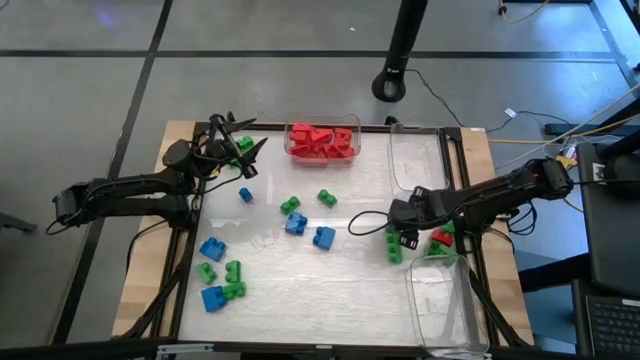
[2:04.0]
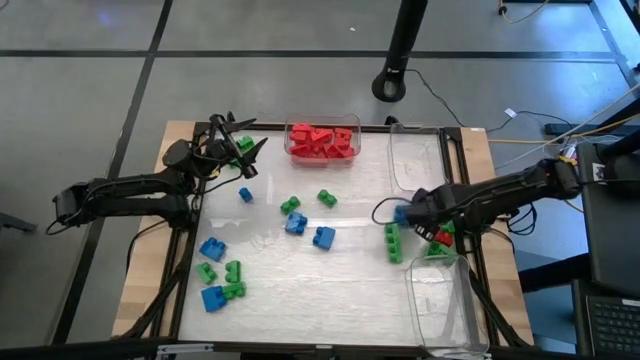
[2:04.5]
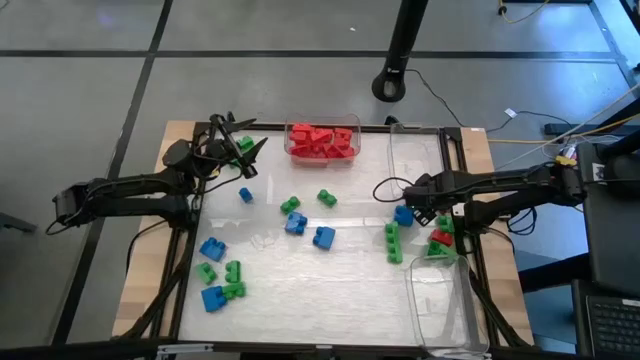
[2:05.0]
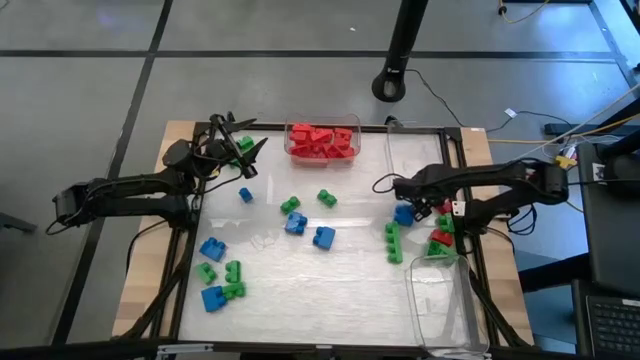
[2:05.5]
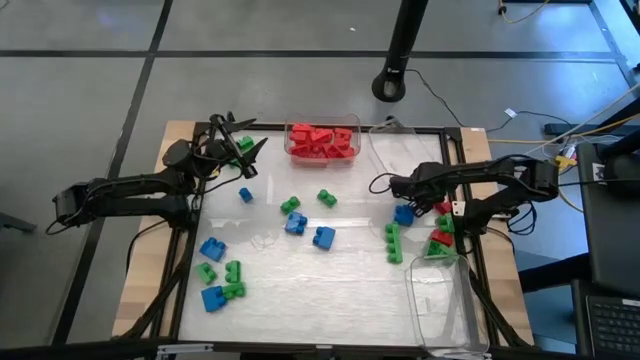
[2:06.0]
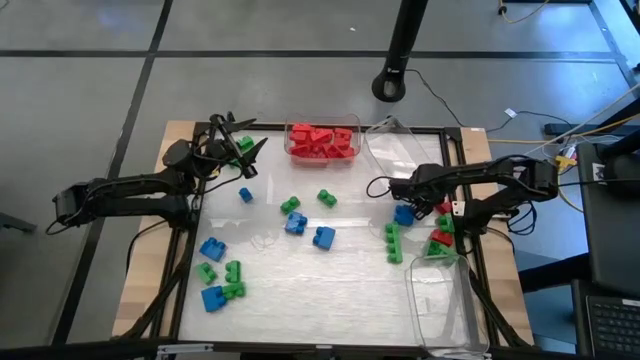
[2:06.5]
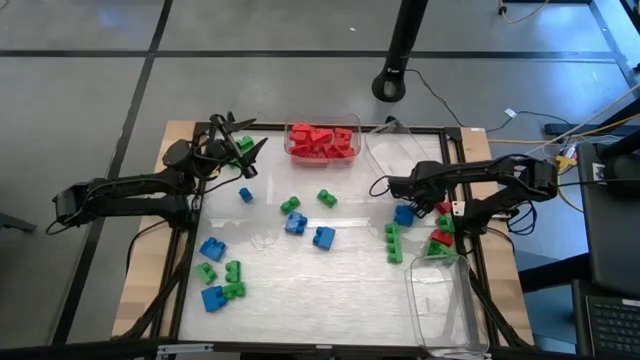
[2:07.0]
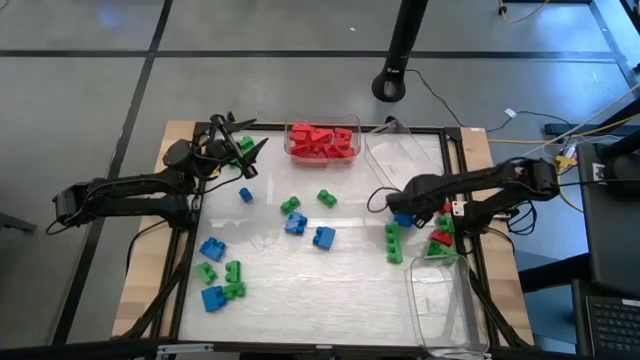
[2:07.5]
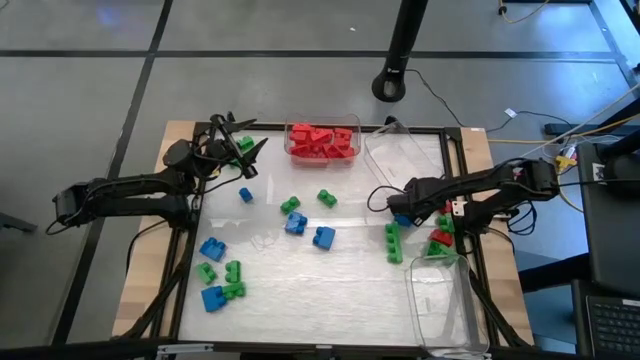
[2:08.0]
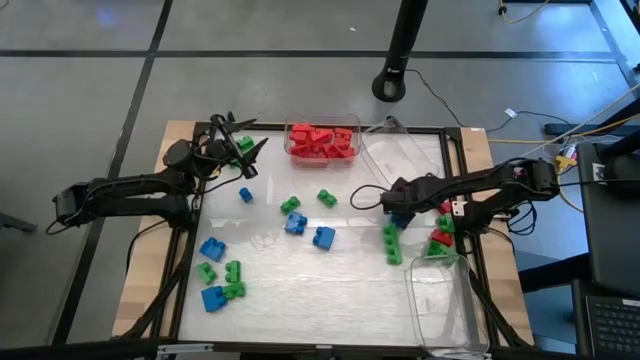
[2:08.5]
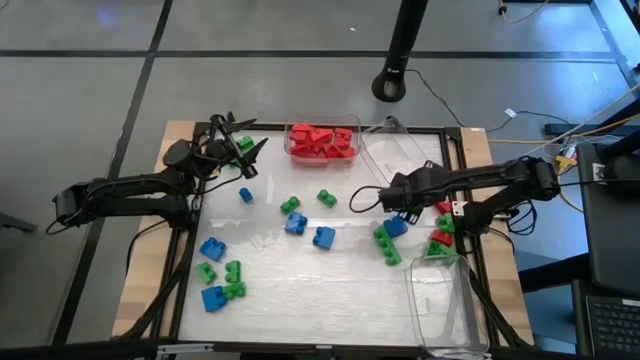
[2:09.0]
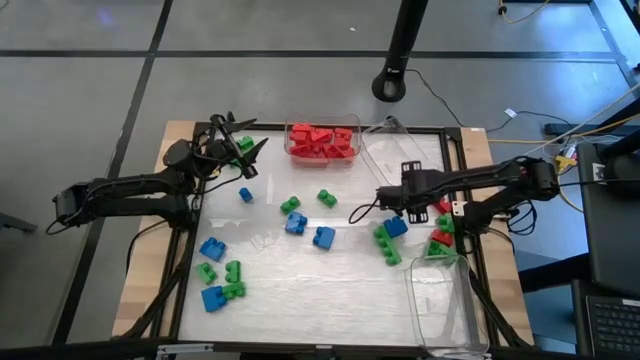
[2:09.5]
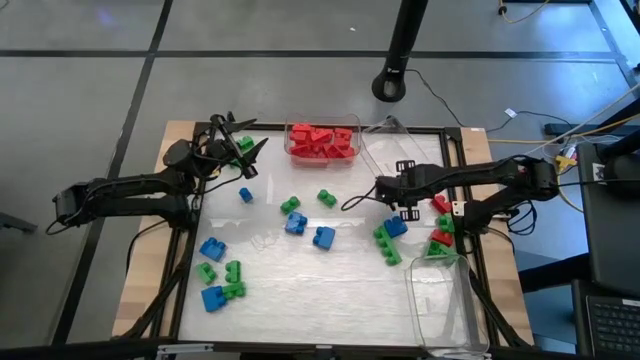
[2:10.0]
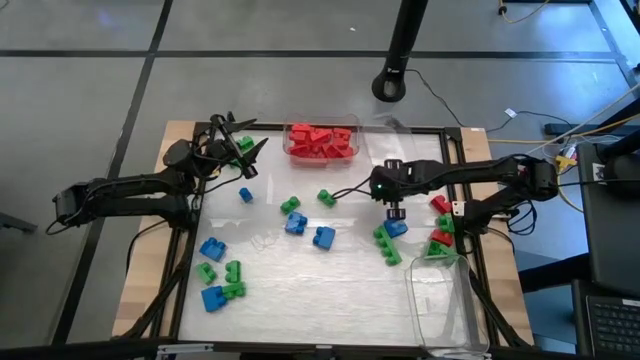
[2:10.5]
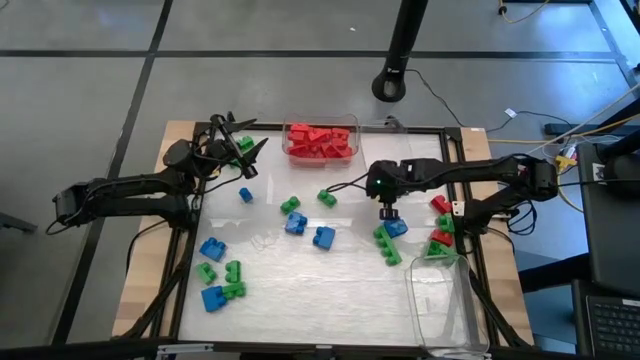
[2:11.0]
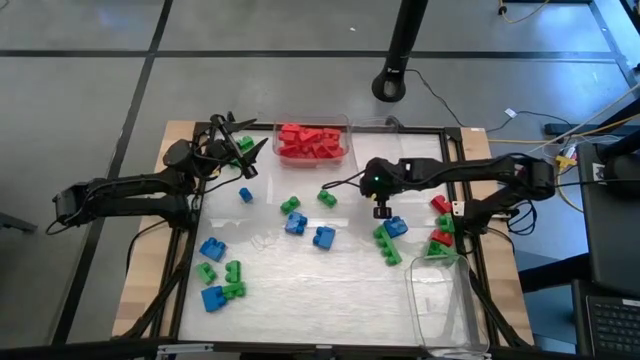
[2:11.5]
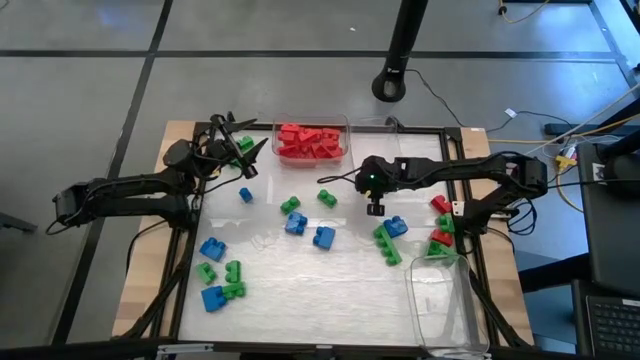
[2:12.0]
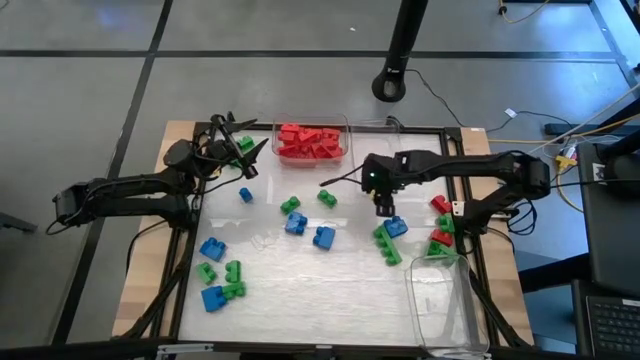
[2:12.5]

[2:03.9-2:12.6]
Task: Sort blocks
Adjust the top right transparent bin

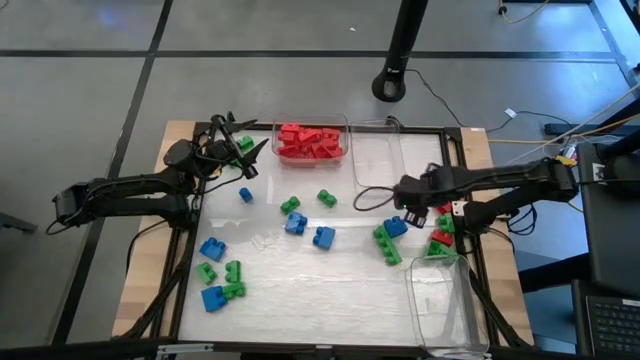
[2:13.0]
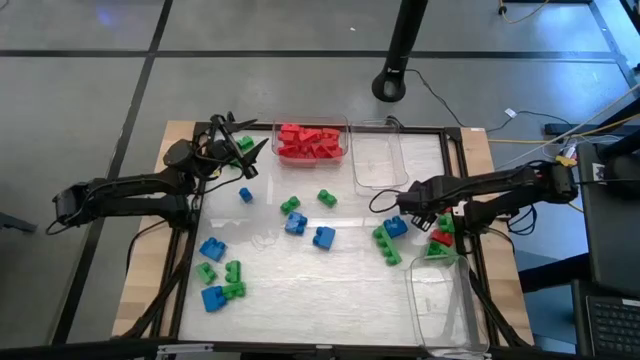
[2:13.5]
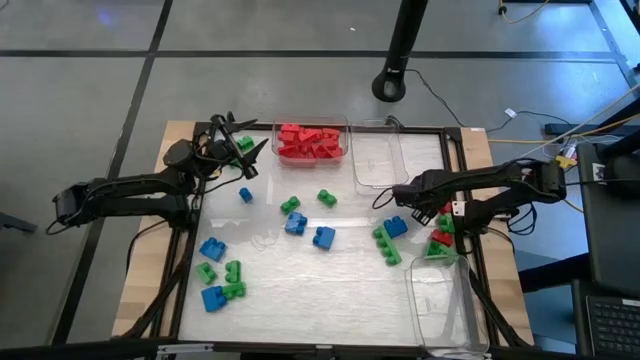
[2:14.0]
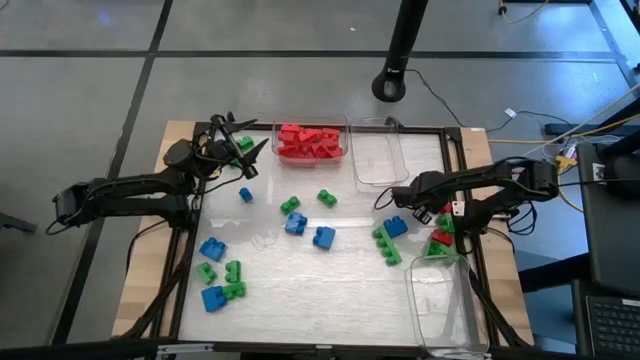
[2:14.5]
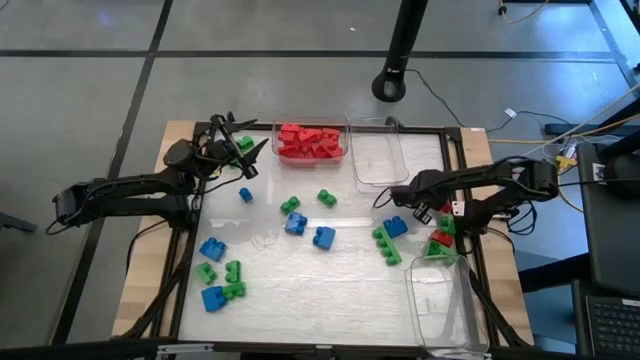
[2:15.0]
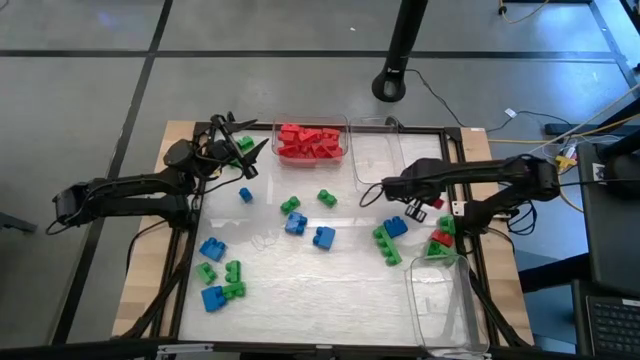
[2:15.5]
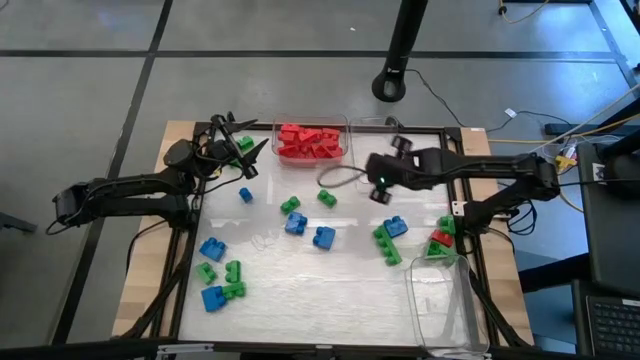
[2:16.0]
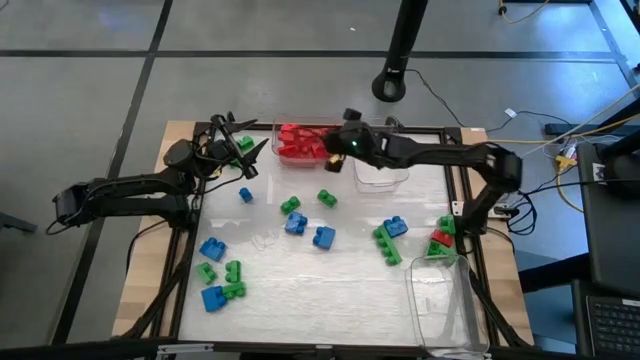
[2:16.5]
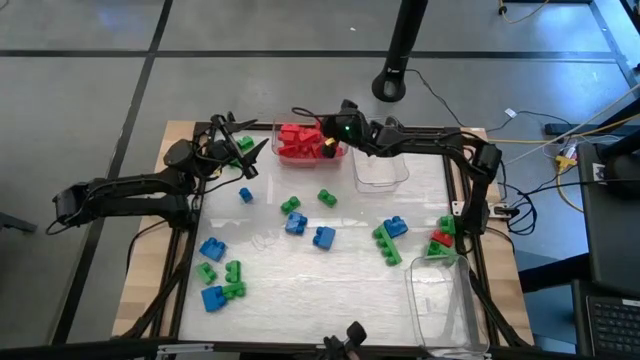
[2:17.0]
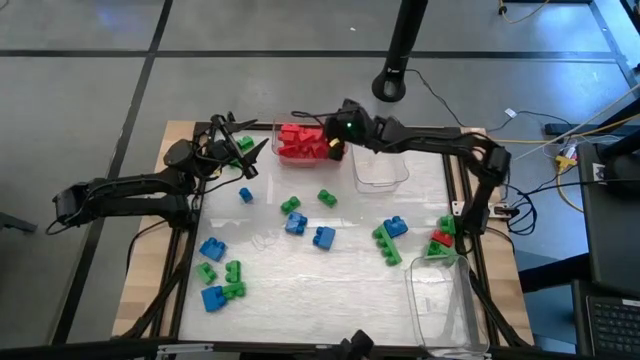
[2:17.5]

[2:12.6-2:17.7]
Put the red game piece into the top left transparent bin

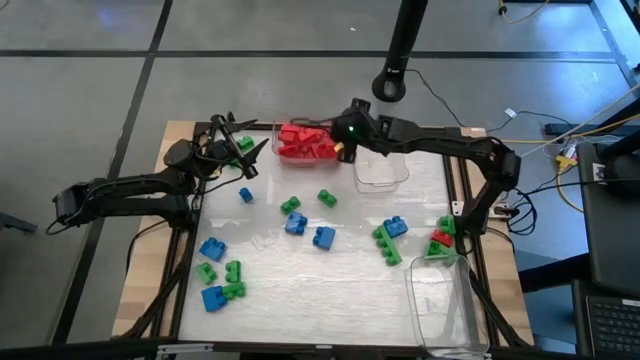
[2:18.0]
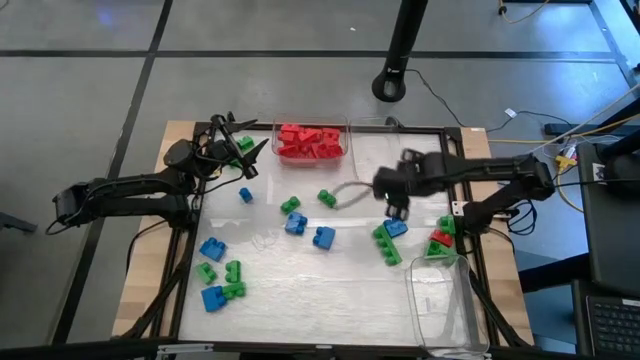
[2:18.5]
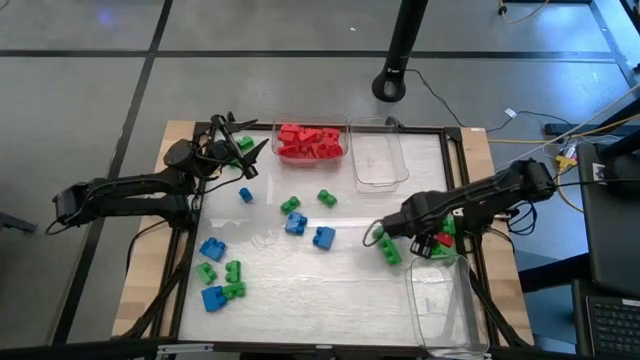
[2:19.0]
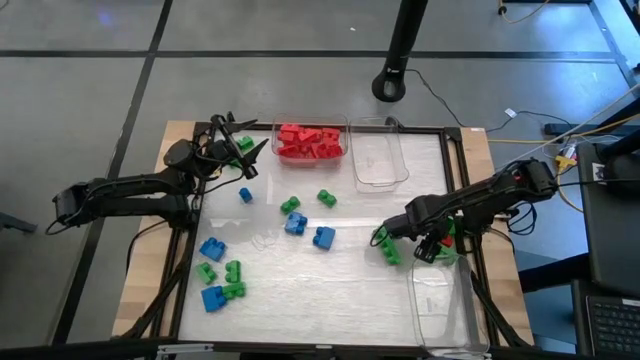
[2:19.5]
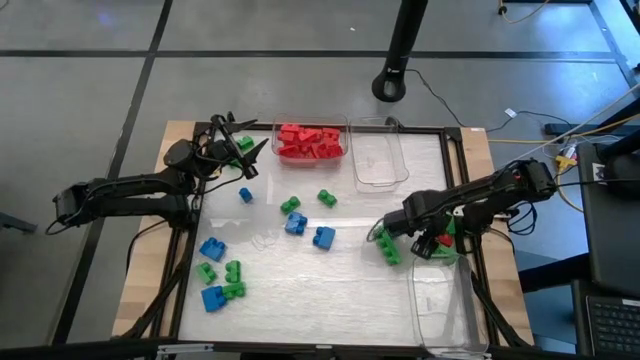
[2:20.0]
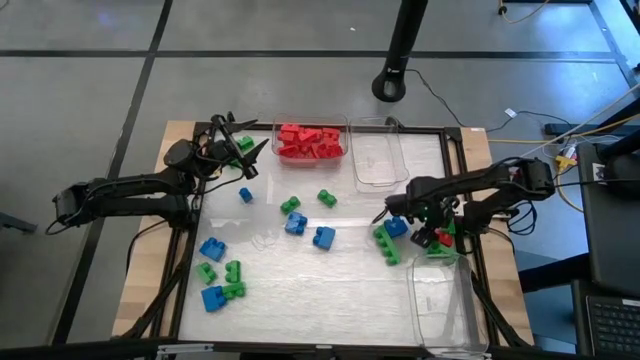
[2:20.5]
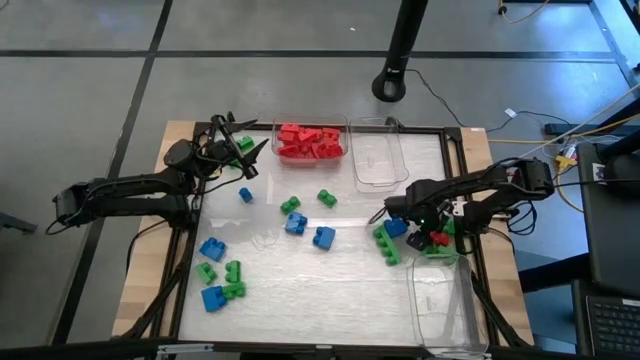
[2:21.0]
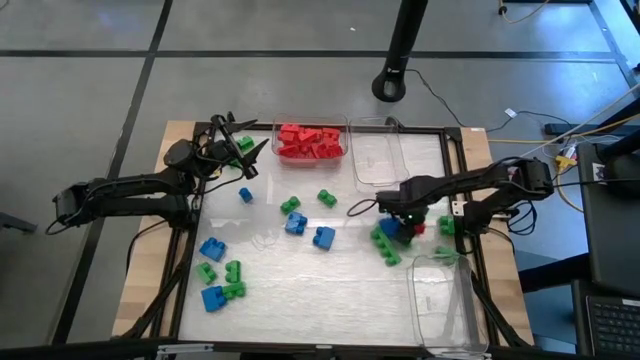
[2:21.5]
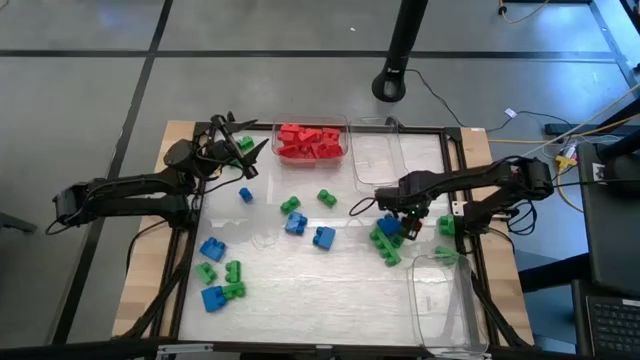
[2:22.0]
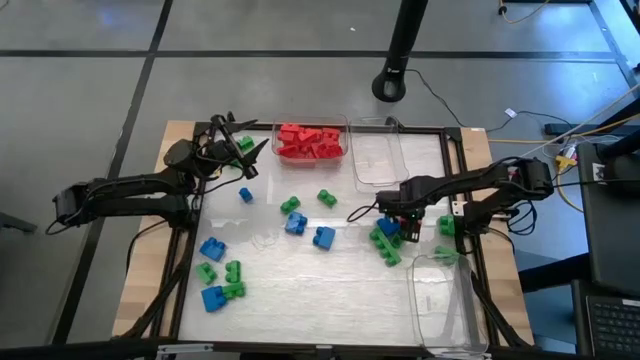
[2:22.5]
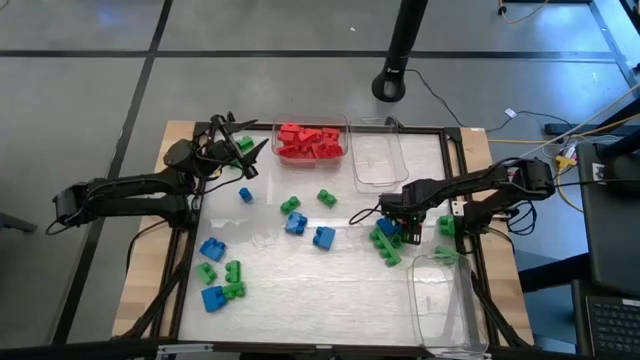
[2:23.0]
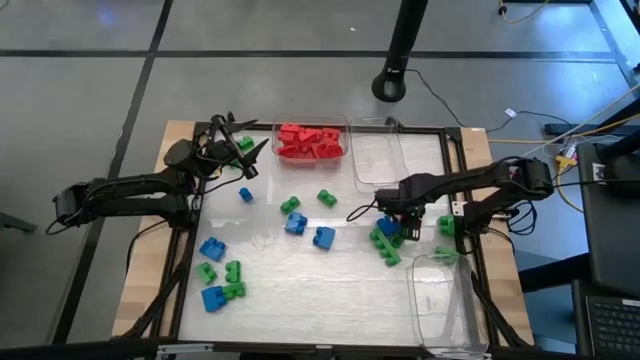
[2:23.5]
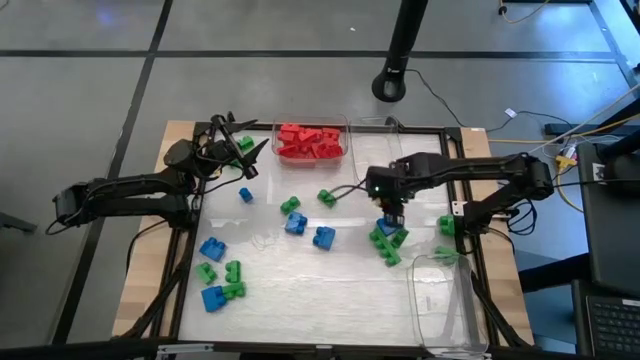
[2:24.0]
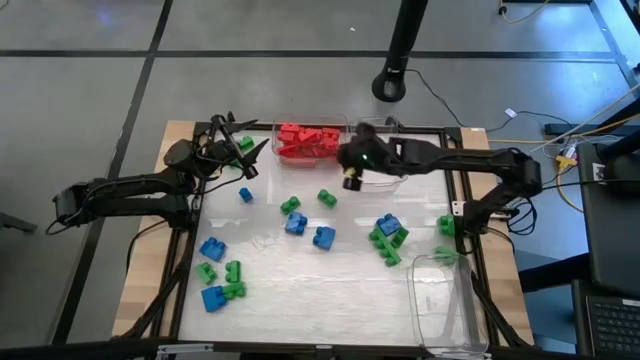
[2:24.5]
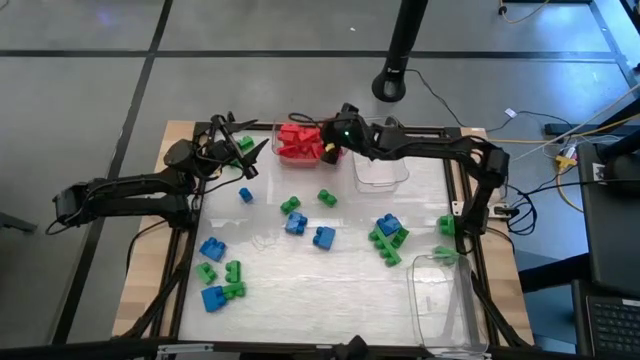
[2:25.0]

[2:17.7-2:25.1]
Put the red game piece into the top left transparent bin
